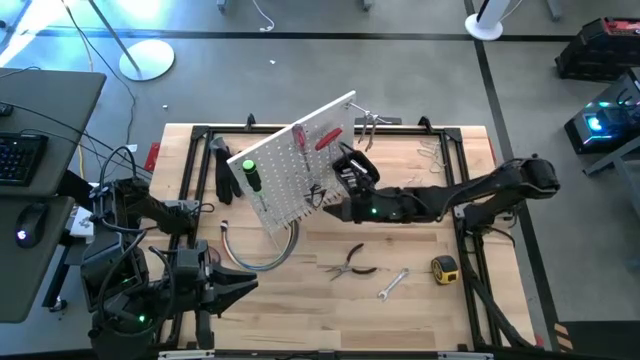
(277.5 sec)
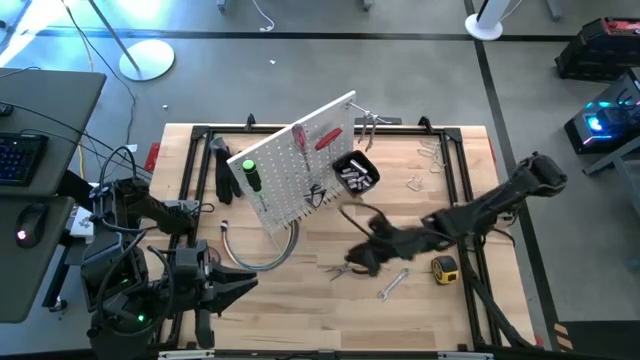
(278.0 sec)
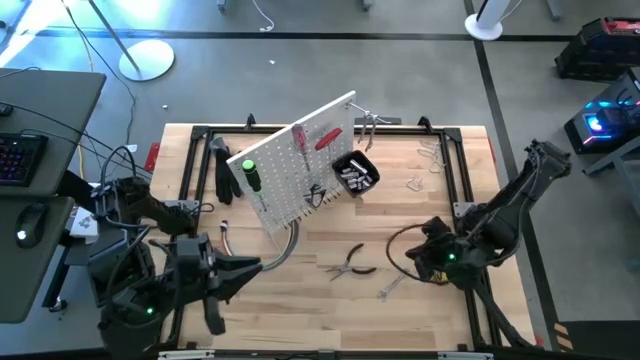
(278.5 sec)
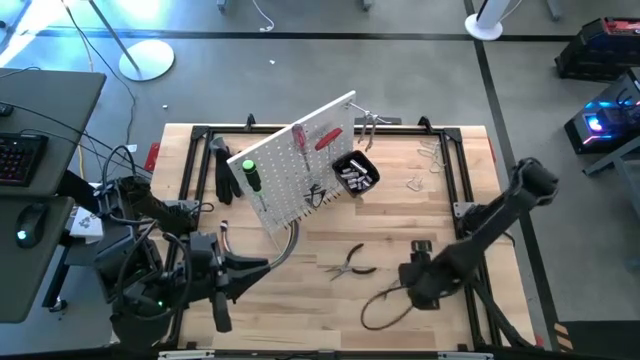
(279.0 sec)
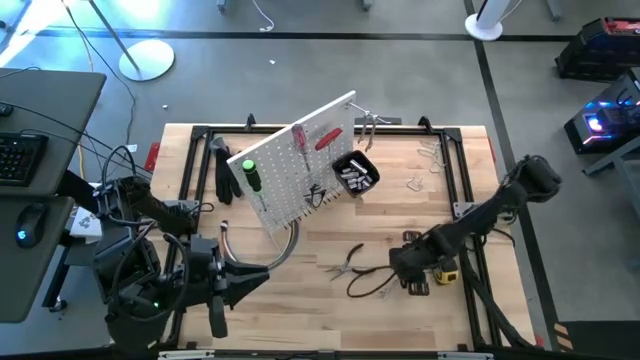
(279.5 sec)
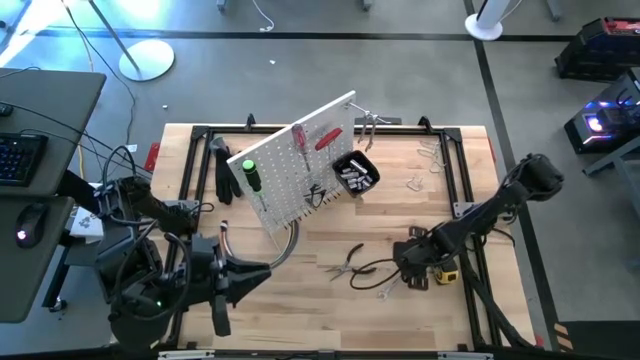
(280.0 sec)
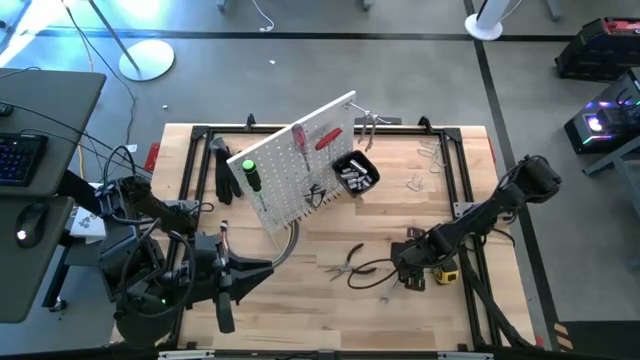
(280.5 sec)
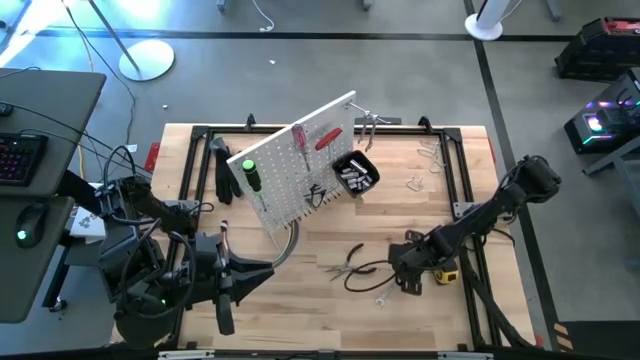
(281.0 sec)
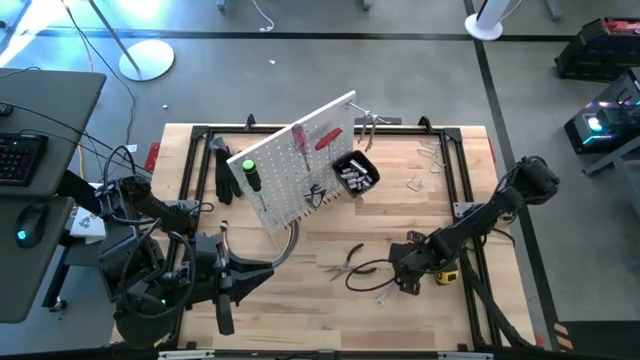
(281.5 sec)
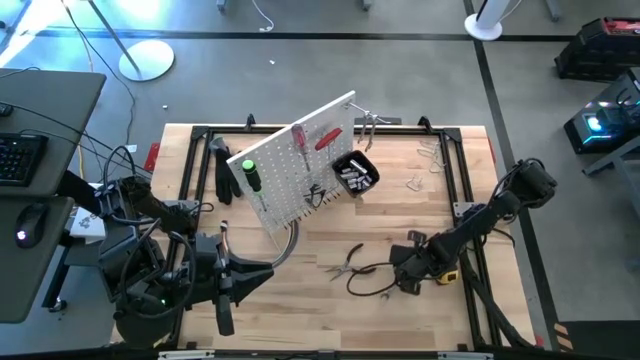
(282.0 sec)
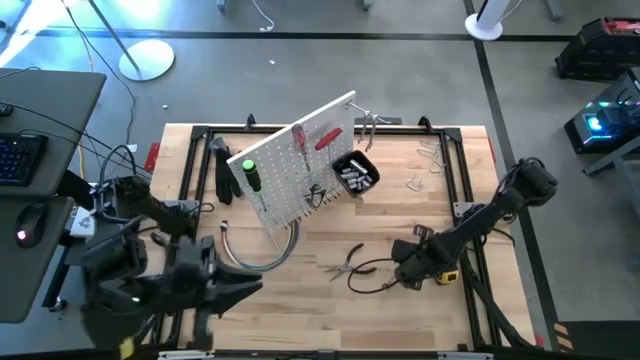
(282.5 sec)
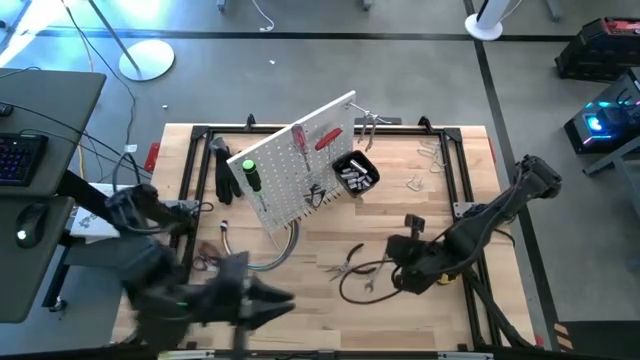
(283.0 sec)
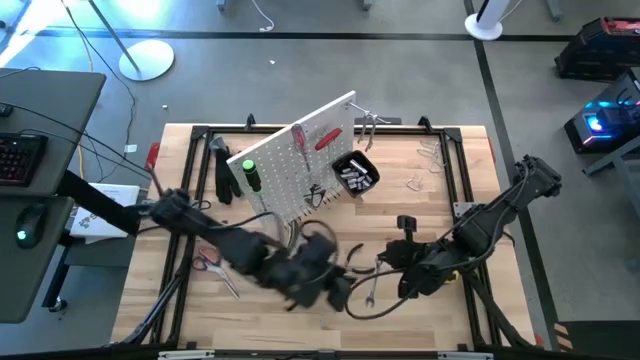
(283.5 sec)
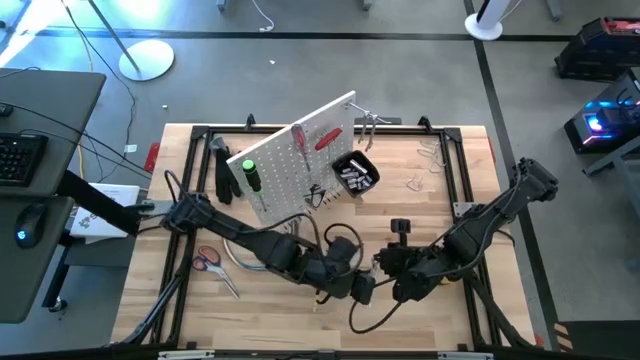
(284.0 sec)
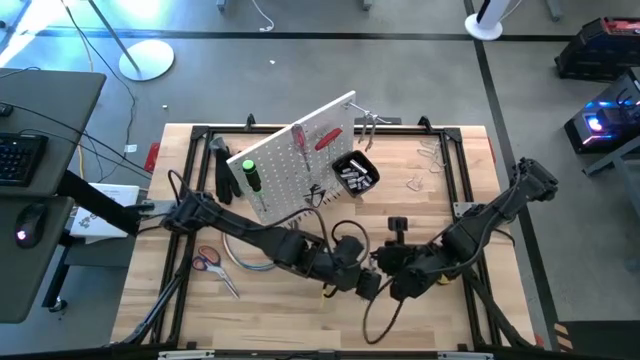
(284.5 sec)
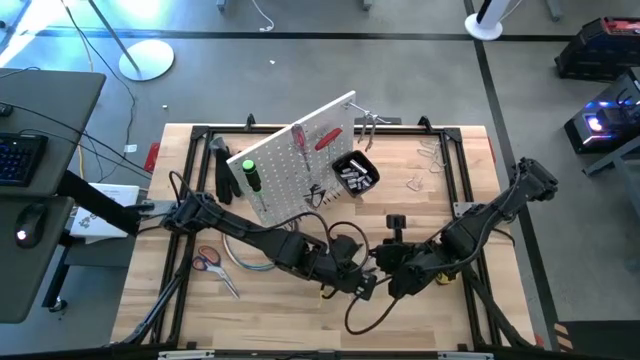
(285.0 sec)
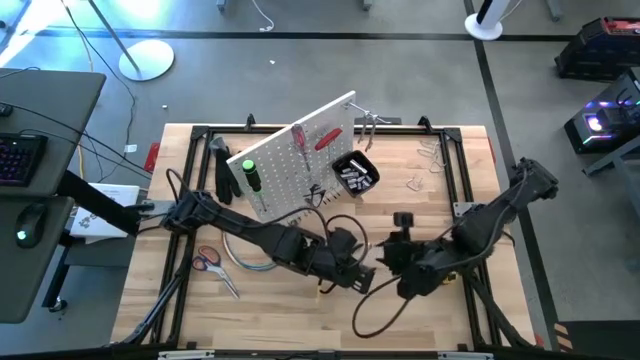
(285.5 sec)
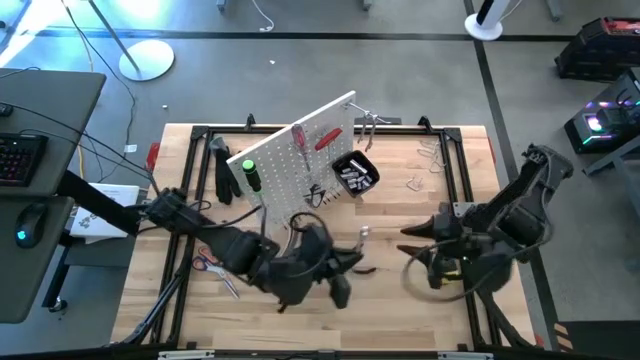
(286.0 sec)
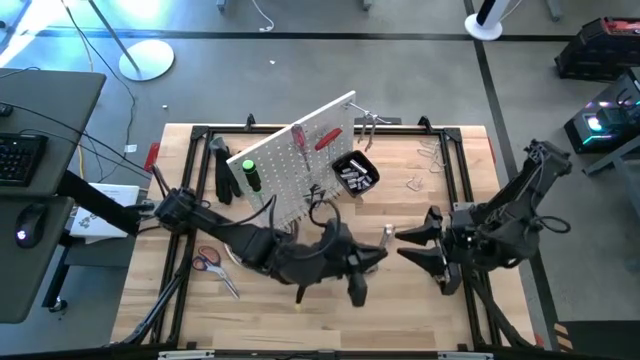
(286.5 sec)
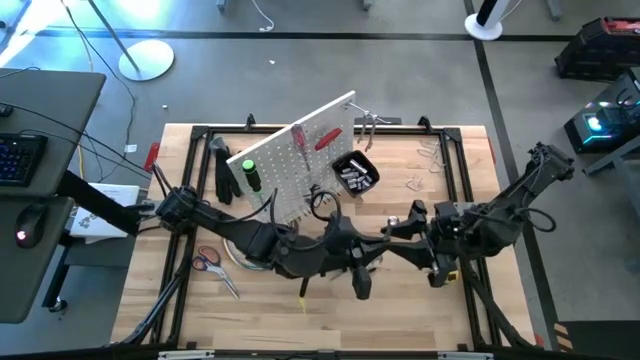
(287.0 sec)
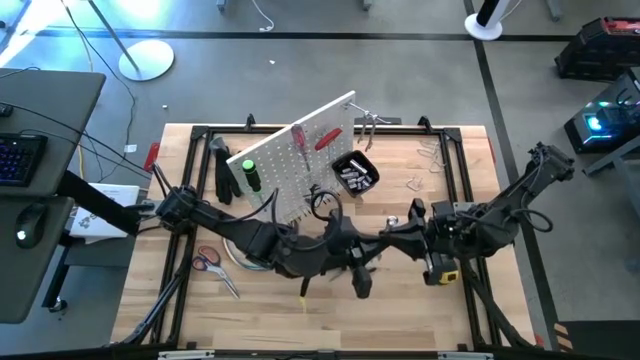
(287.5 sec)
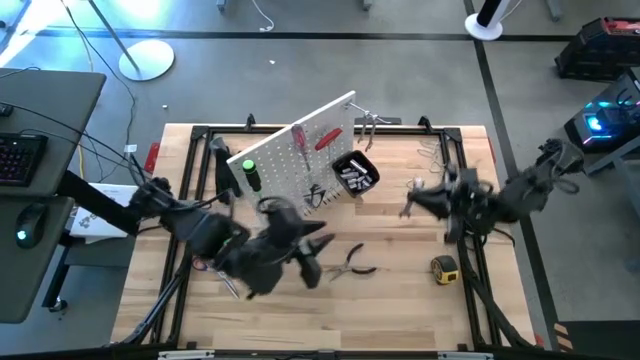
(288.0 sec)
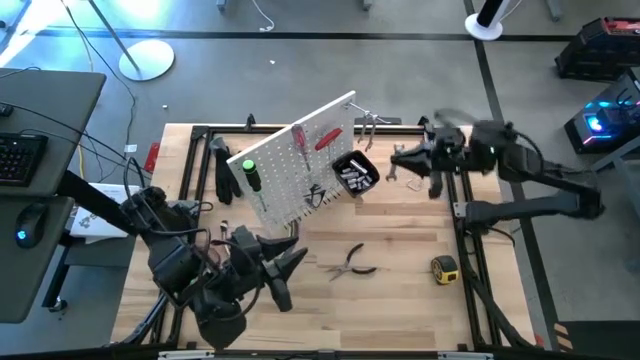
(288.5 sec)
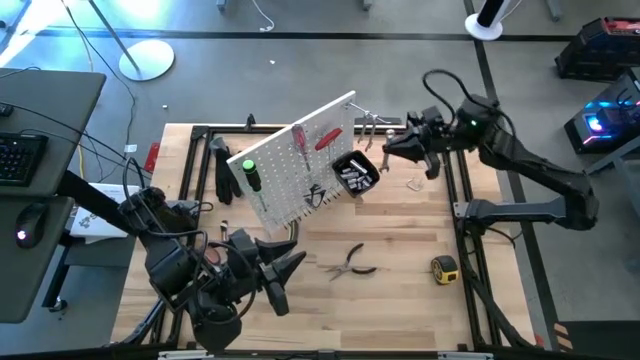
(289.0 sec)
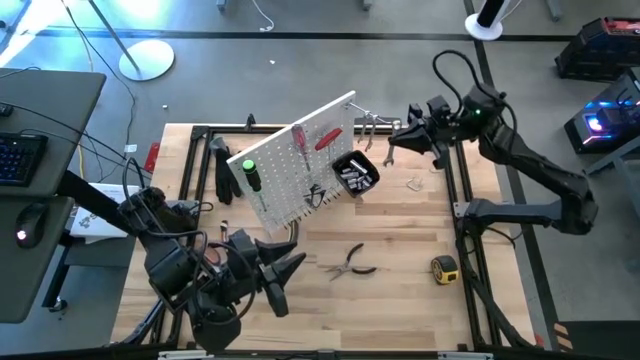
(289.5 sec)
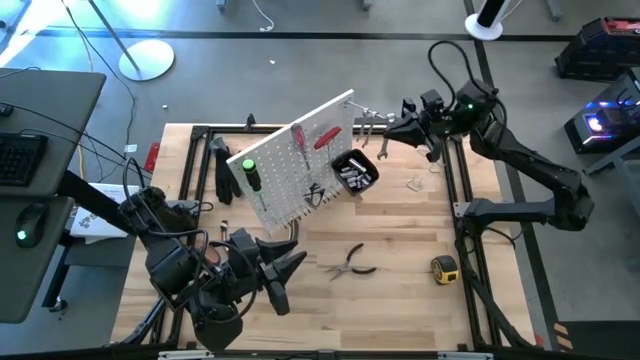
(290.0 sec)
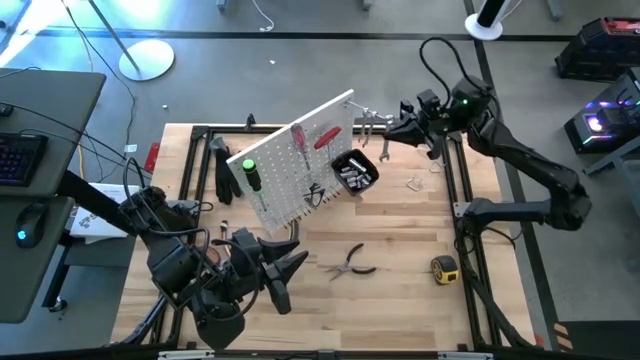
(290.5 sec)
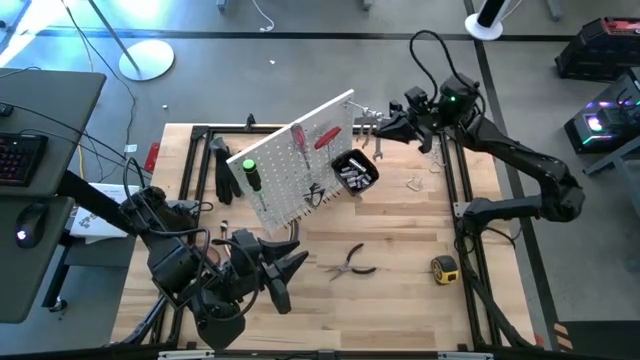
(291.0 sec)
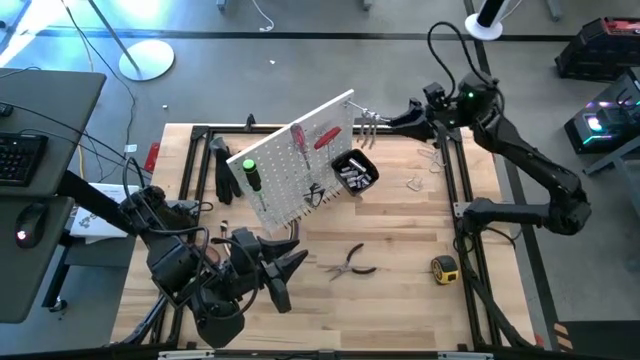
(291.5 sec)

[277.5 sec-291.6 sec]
Task: Hang tools onto peg board
Hang the wrench on the peg board

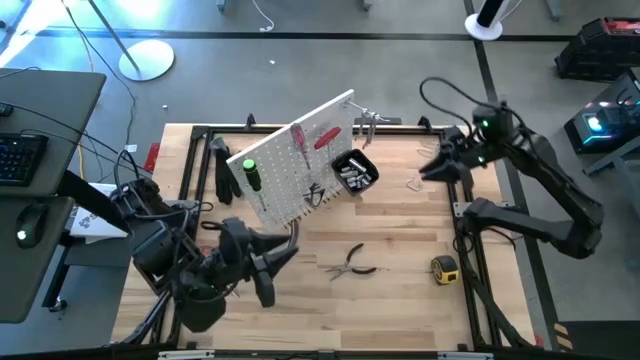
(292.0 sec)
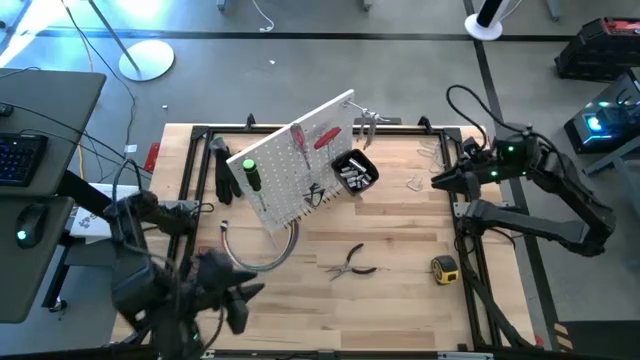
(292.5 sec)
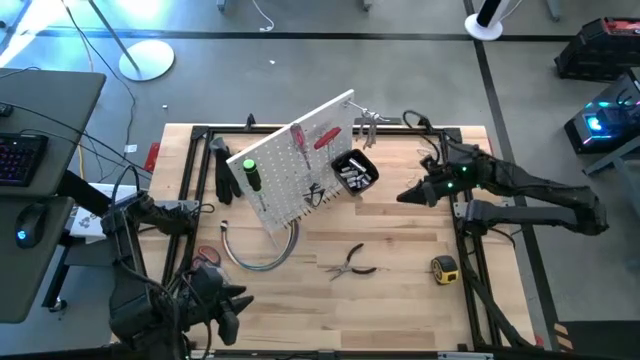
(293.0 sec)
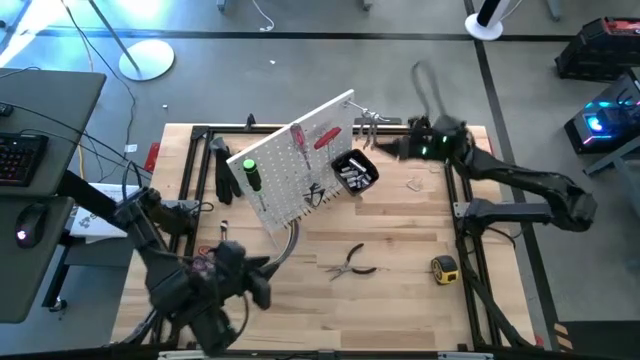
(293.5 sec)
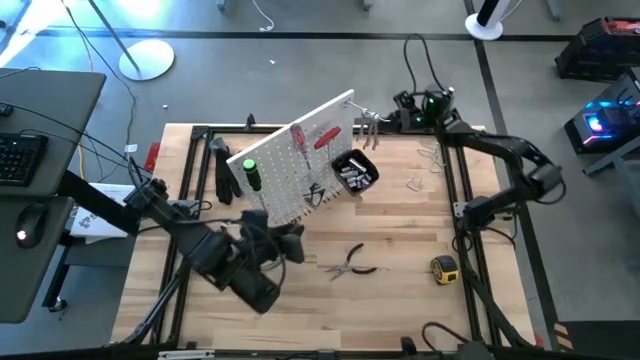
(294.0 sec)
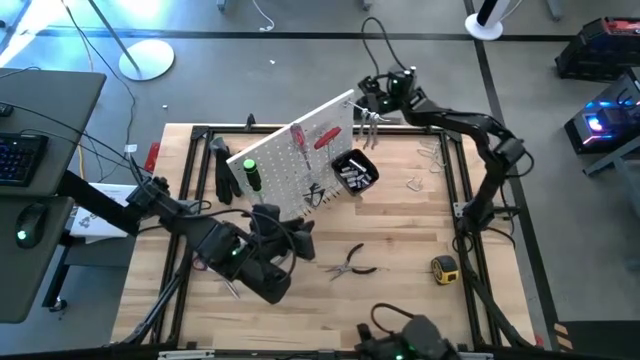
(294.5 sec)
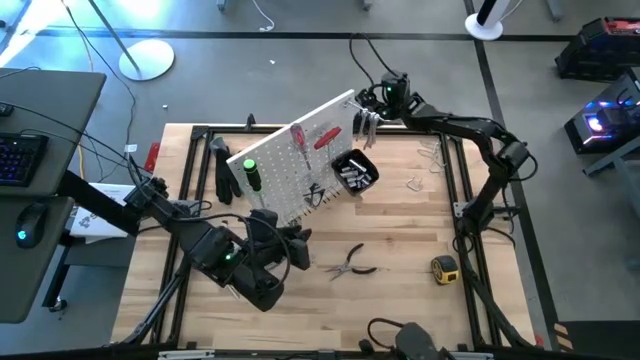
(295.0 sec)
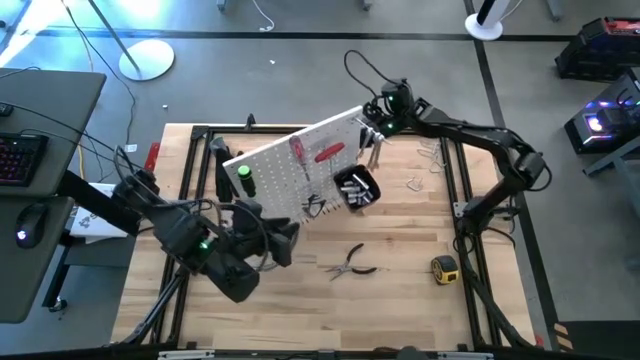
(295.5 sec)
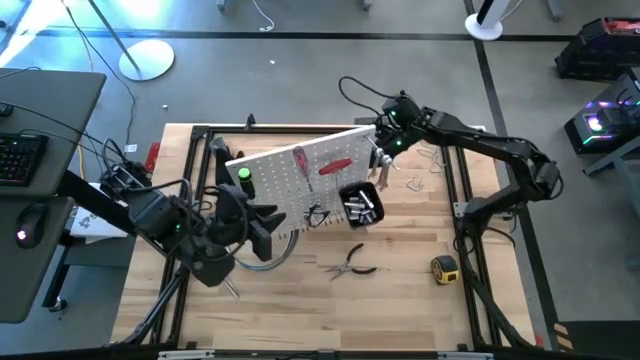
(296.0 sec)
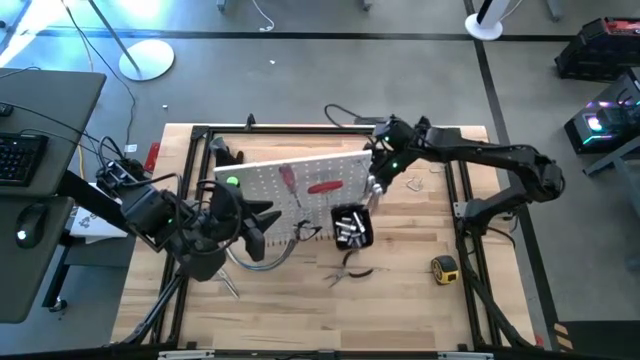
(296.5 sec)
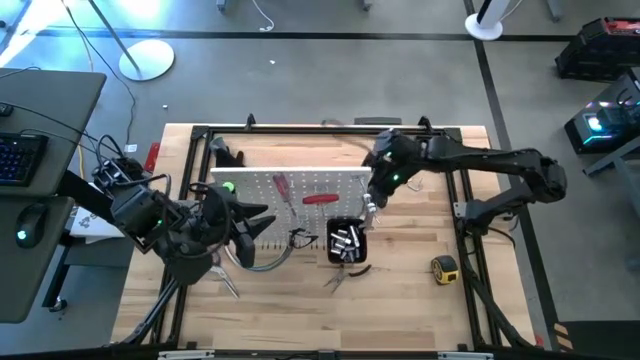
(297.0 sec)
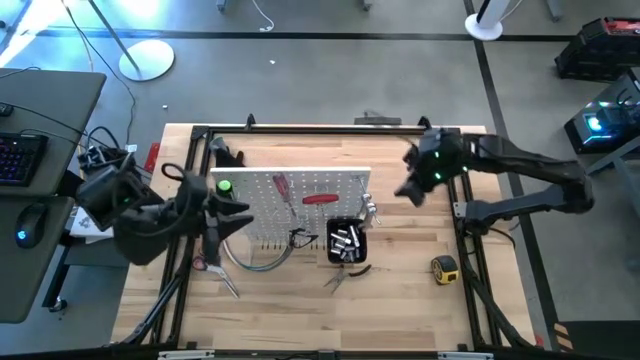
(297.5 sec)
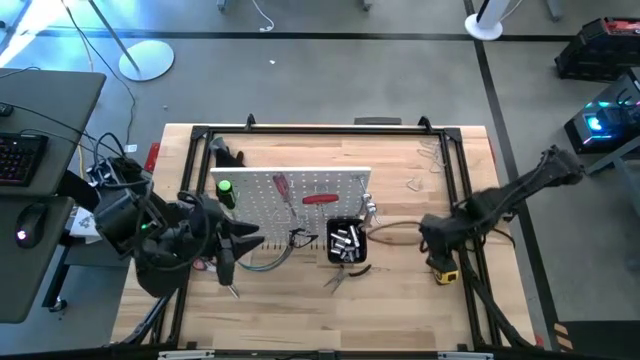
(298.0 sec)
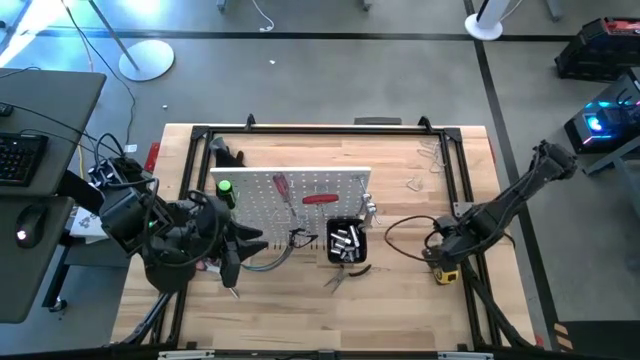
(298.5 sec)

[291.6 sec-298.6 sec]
Adjust the peg board
